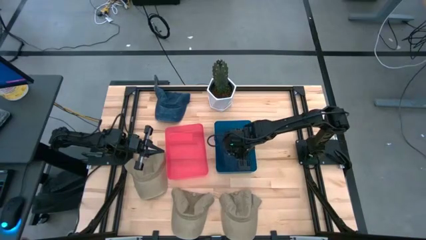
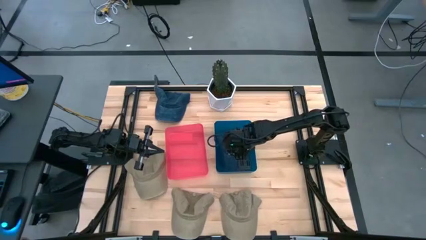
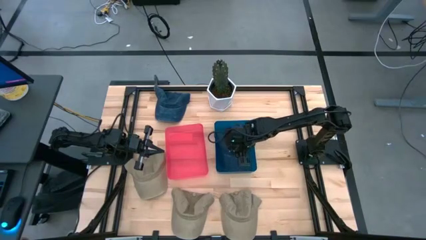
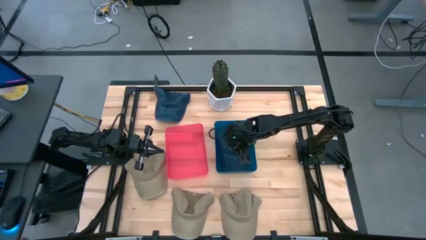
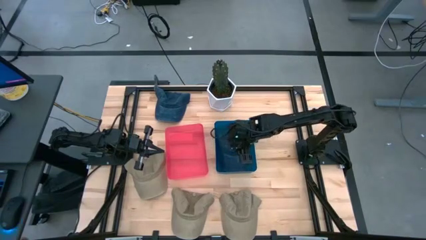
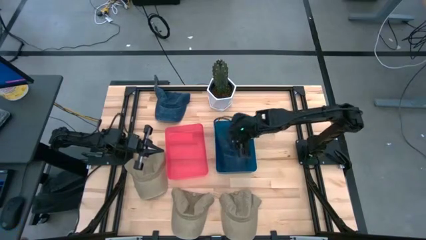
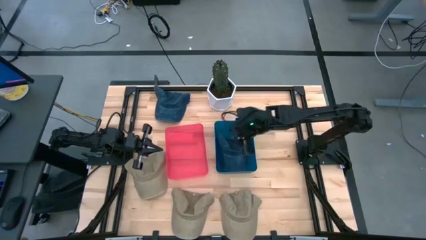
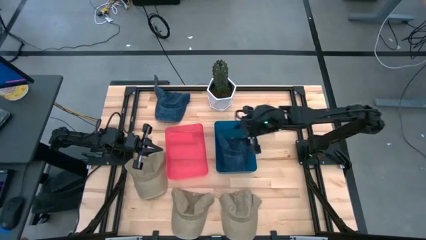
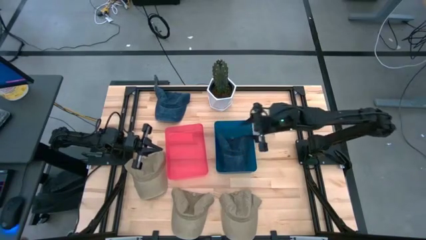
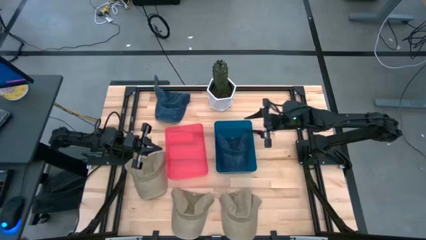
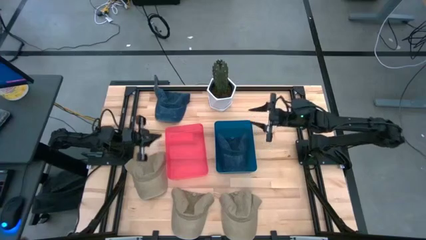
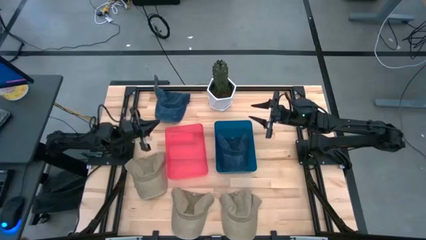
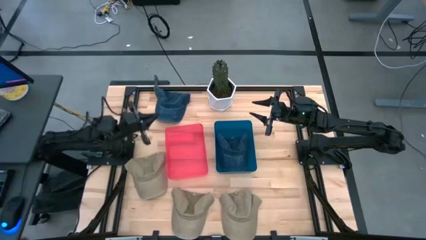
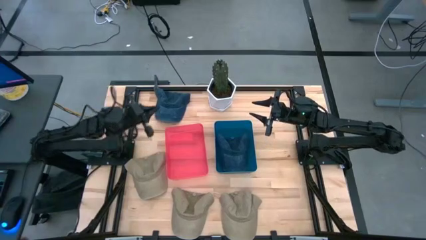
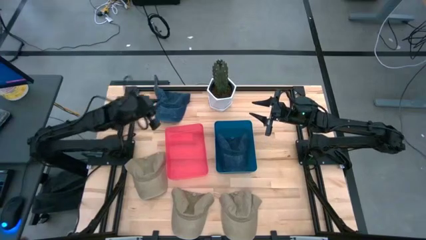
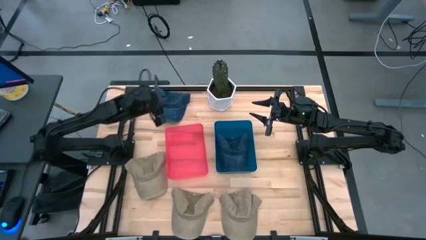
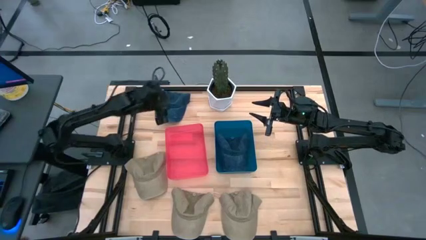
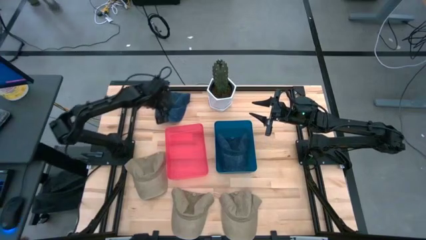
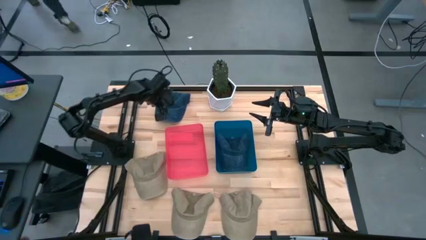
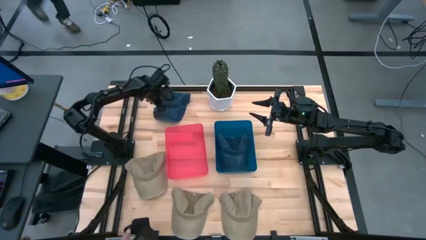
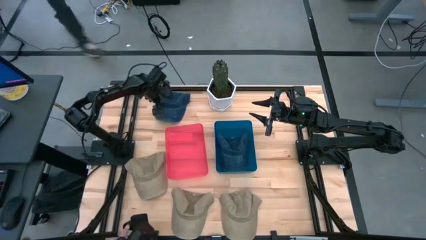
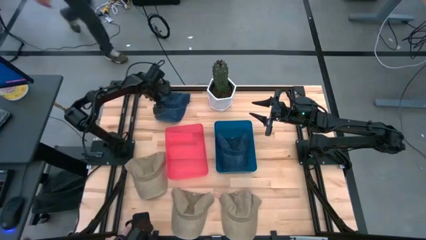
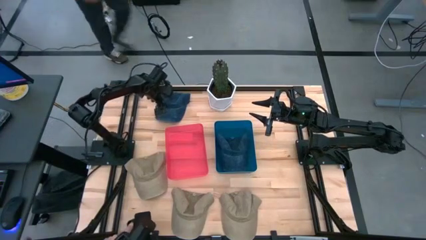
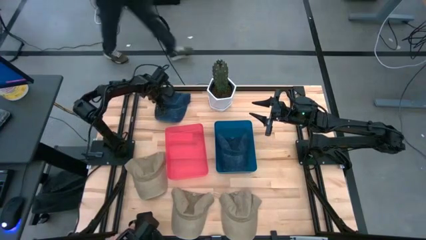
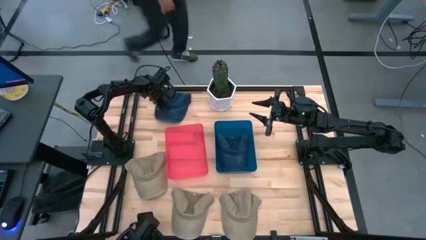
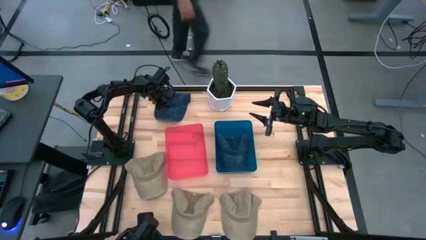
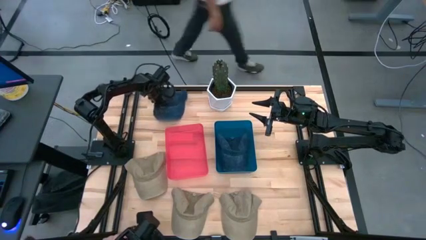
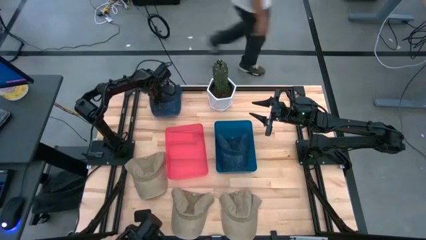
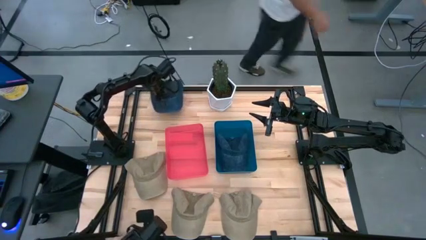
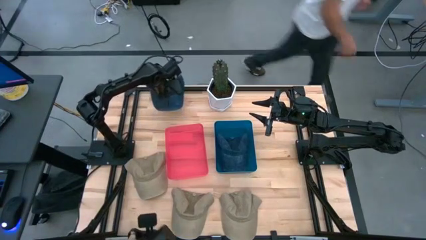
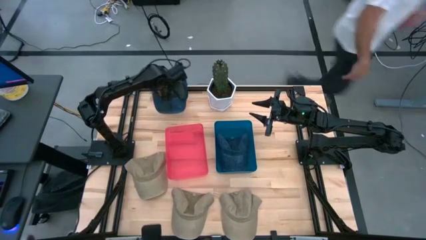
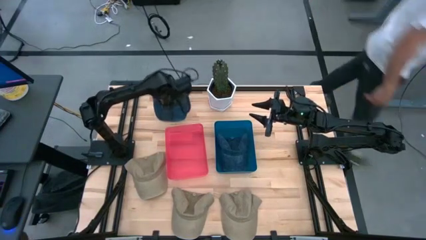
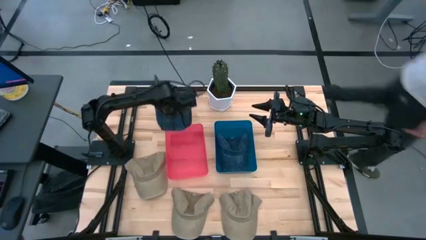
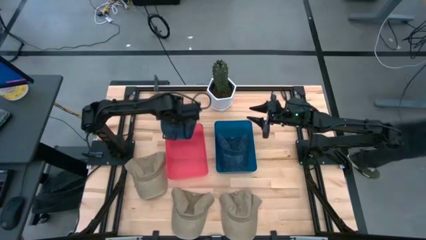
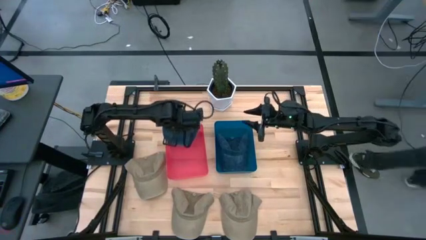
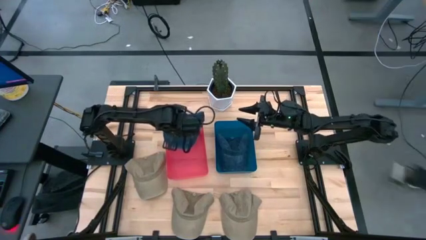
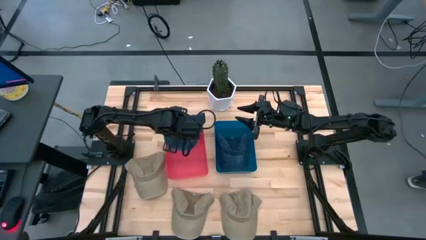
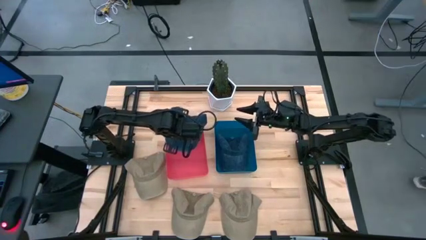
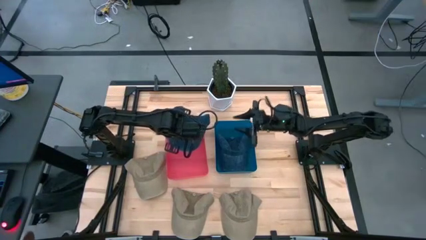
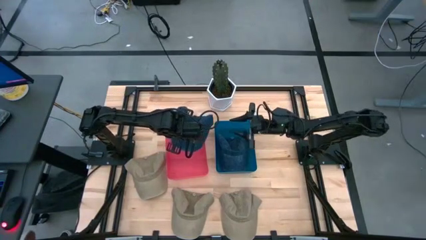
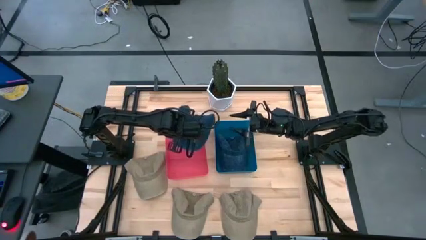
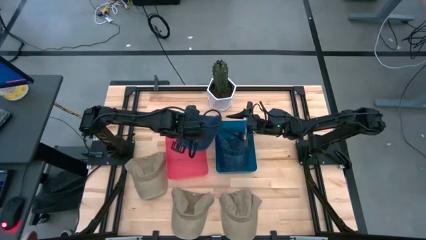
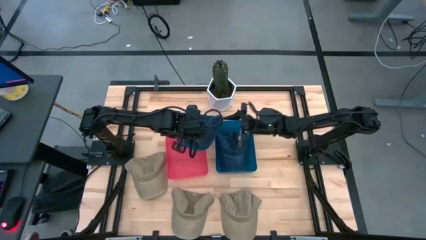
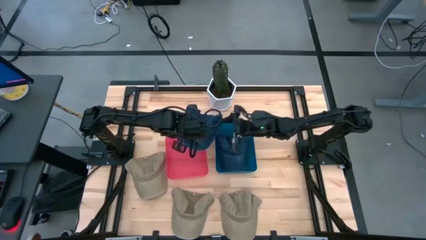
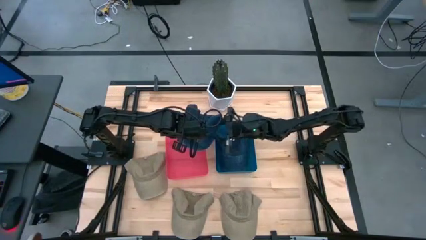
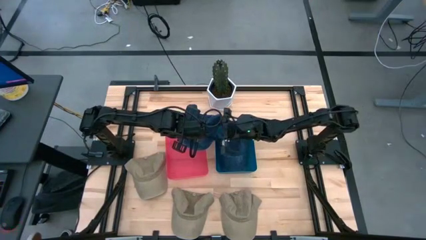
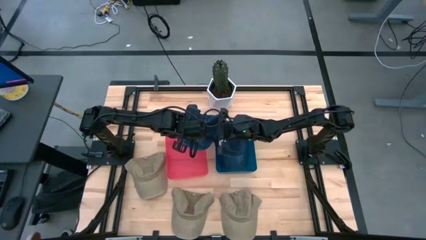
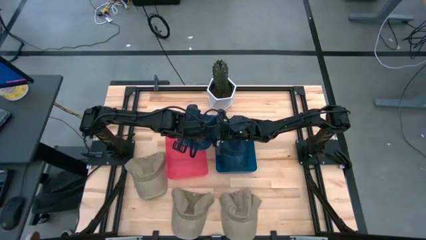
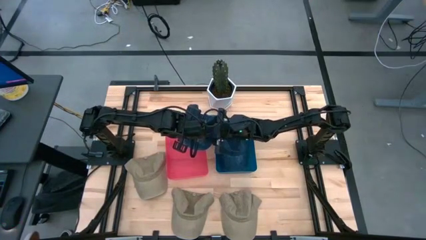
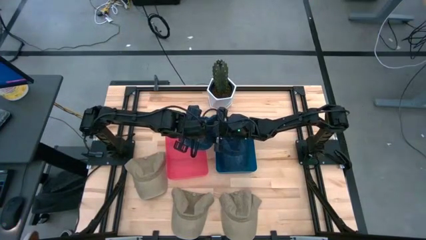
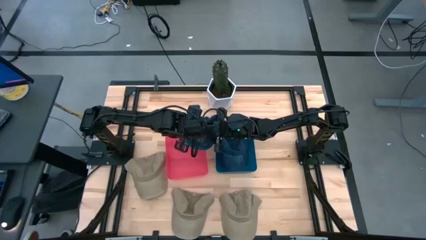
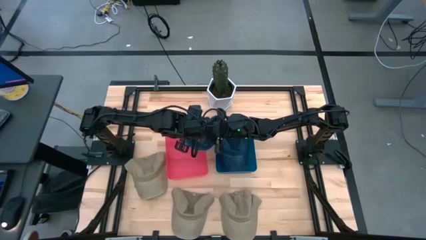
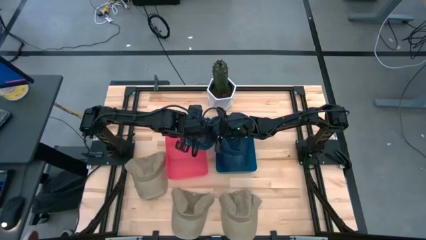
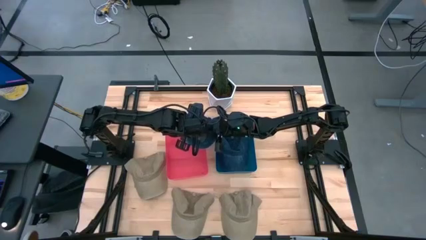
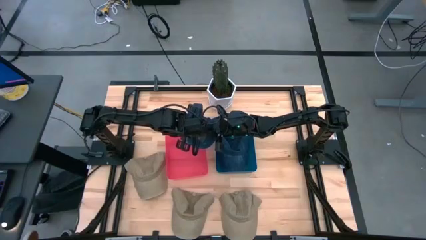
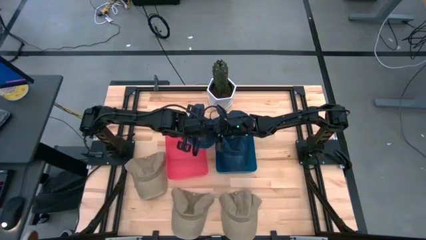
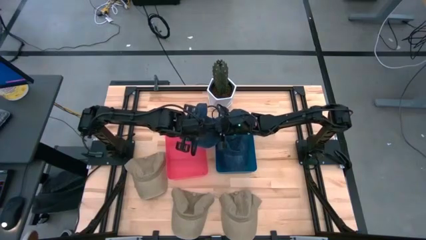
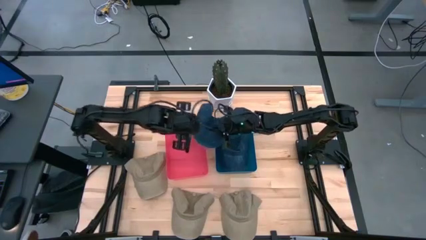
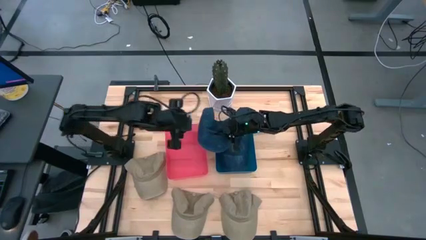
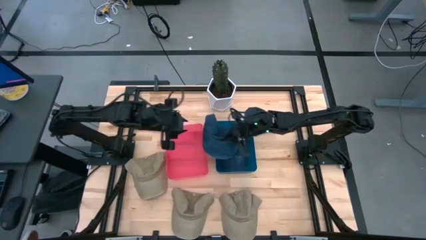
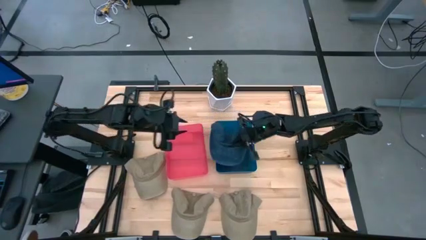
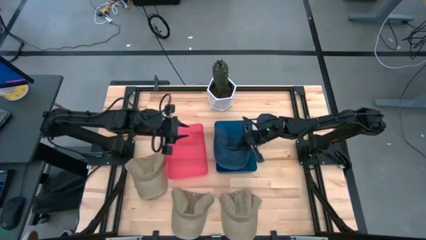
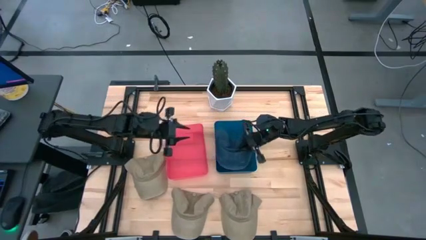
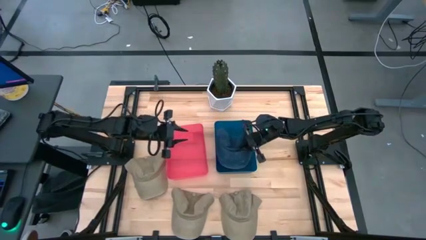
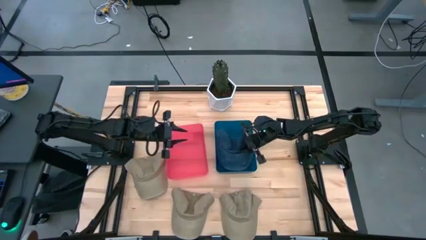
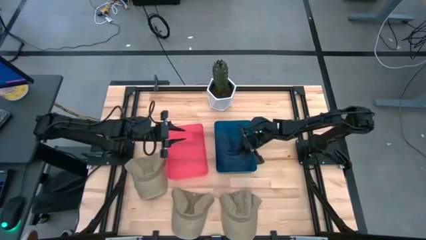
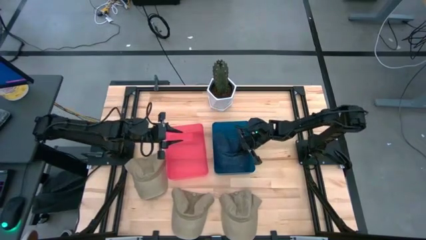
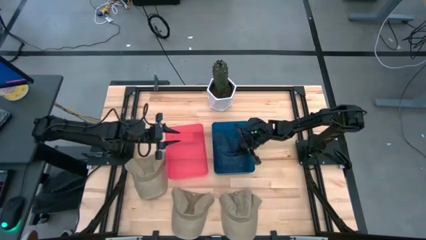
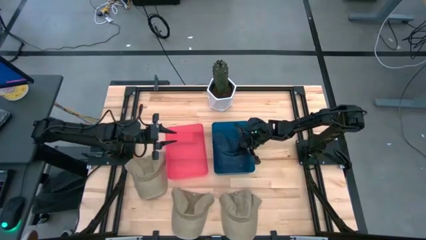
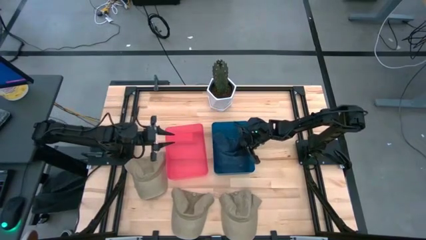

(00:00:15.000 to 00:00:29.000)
Task: Pick & Place hat
Put the blue cap into the blue bin

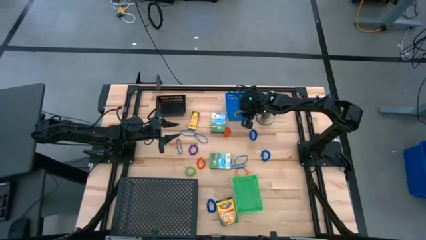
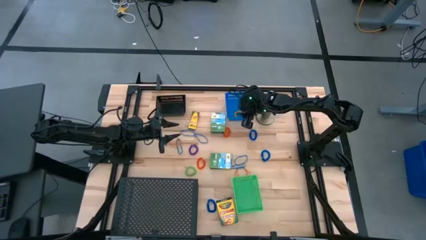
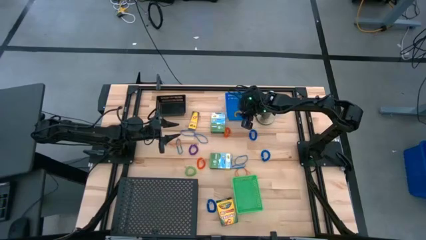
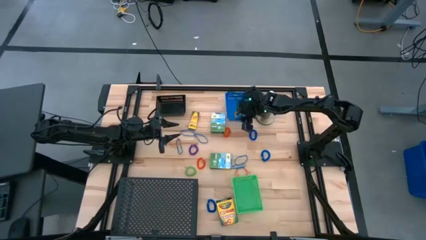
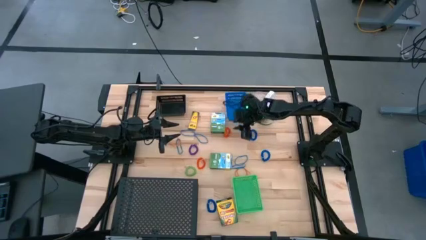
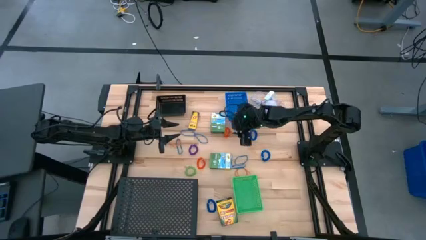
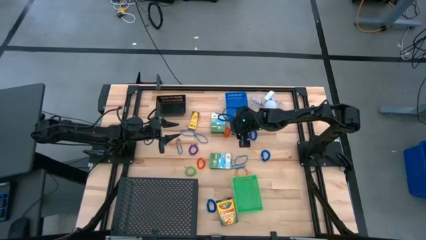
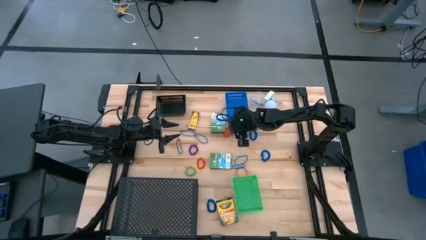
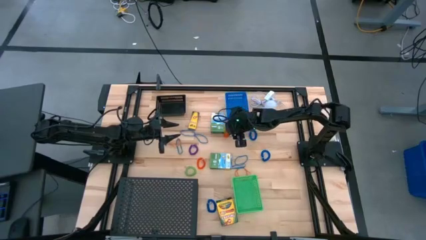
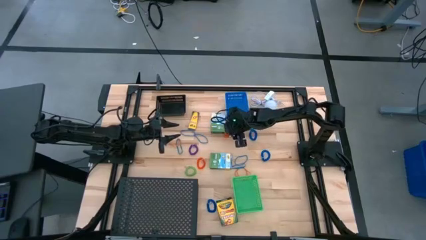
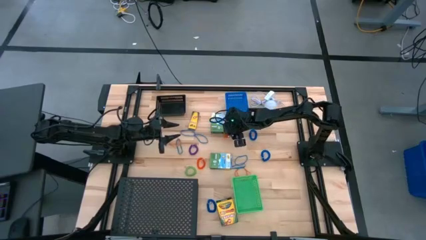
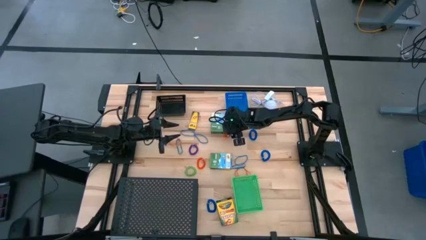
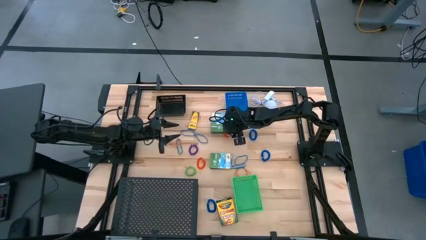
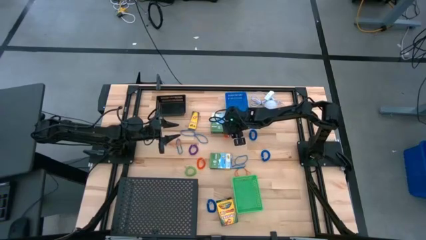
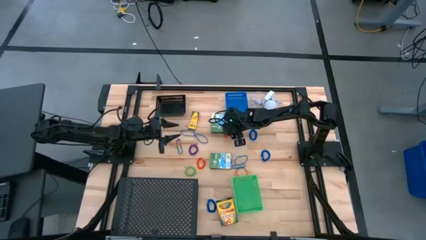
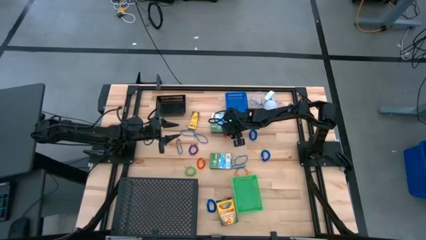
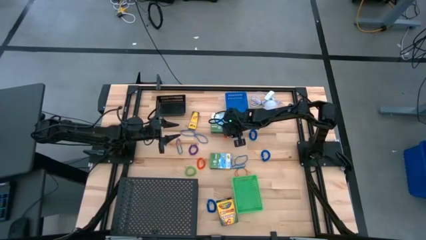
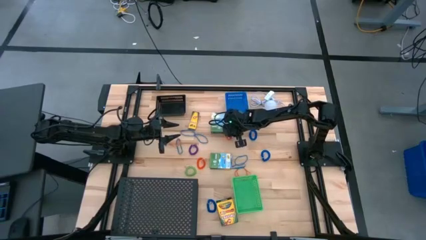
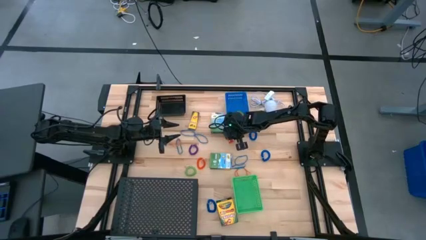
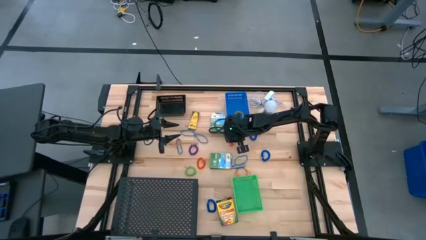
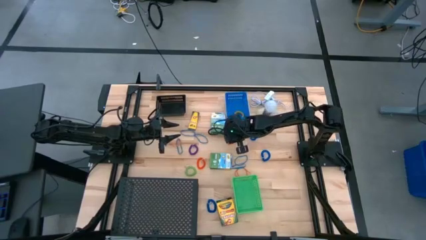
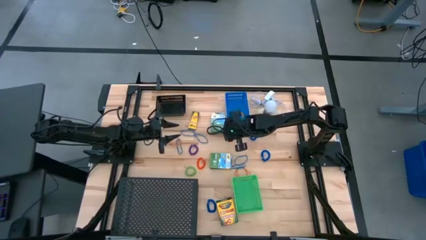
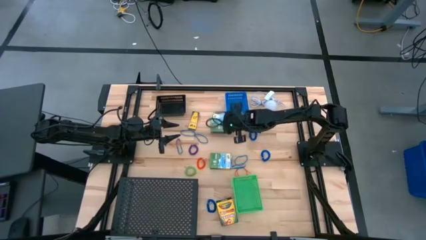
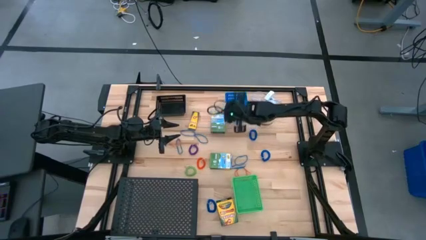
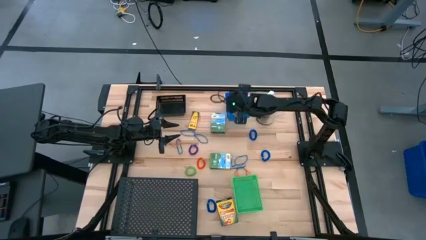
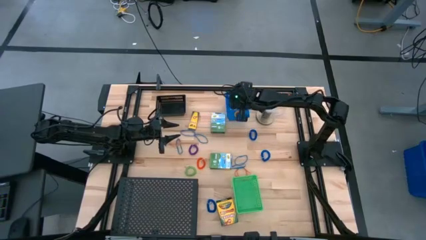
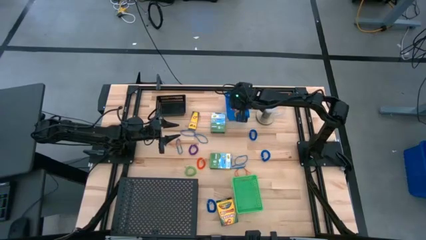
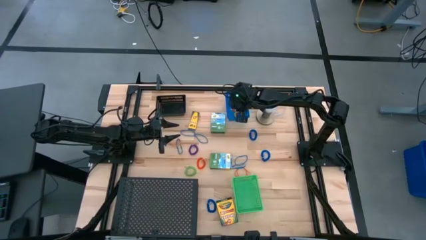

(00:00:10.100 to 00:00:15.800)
Task: Pick & Place Office Desk Supplies
Put the top orange spring keychain into the blue bin
